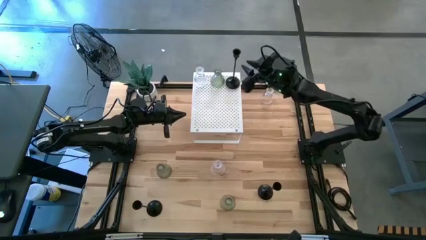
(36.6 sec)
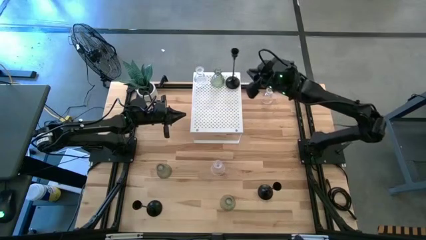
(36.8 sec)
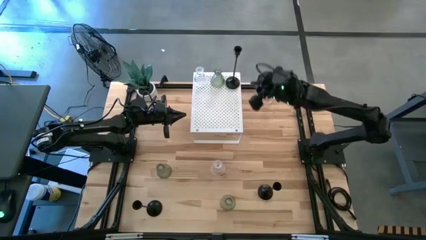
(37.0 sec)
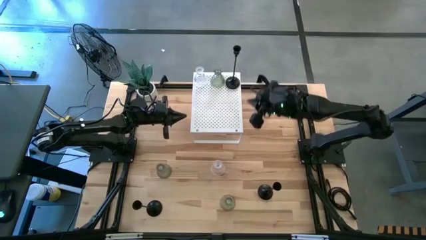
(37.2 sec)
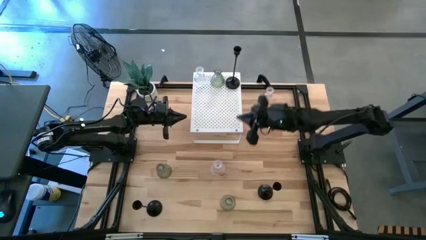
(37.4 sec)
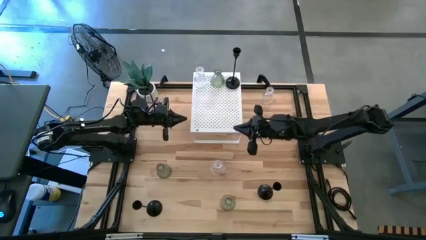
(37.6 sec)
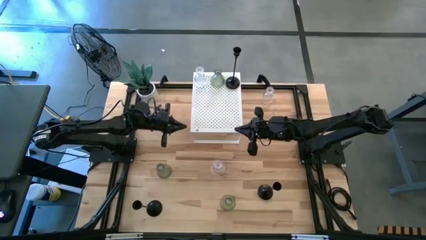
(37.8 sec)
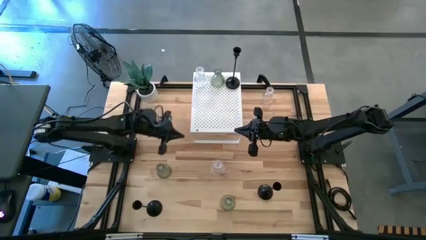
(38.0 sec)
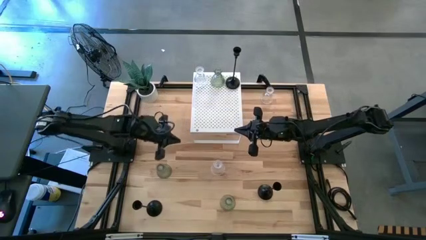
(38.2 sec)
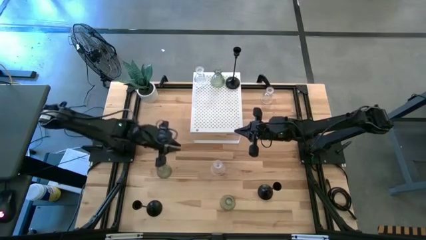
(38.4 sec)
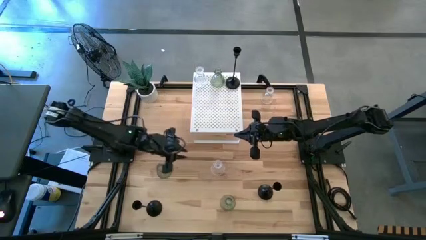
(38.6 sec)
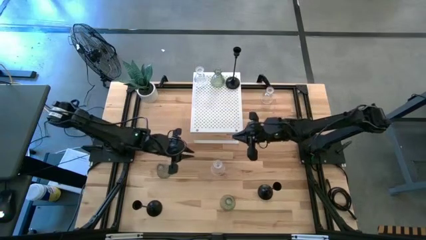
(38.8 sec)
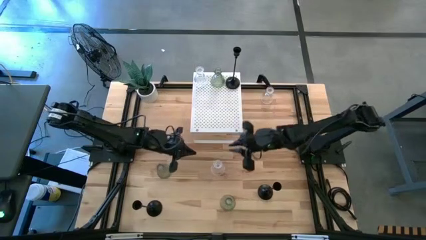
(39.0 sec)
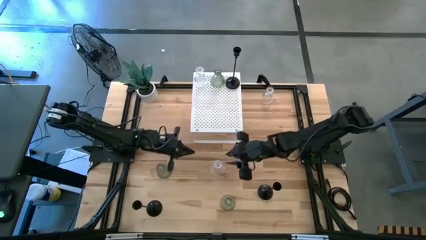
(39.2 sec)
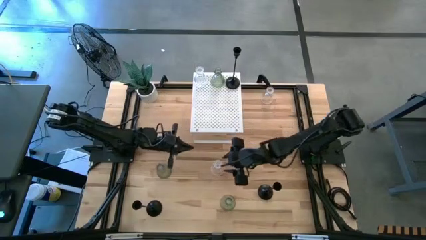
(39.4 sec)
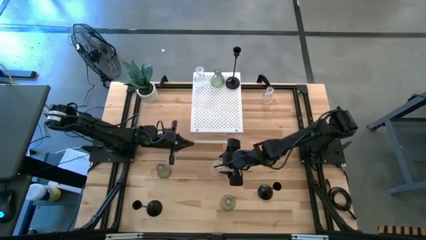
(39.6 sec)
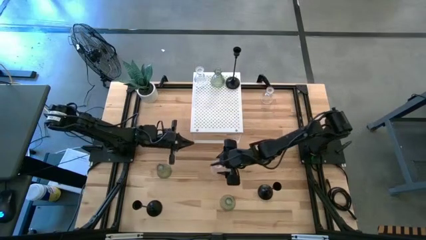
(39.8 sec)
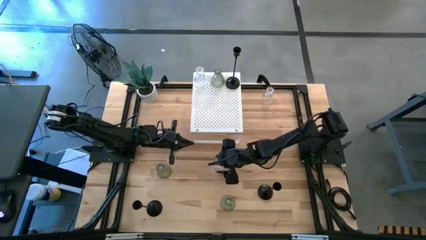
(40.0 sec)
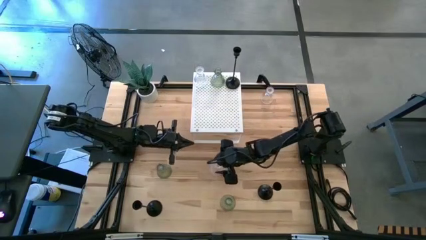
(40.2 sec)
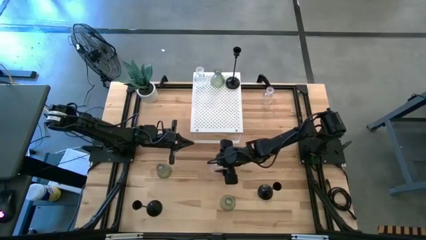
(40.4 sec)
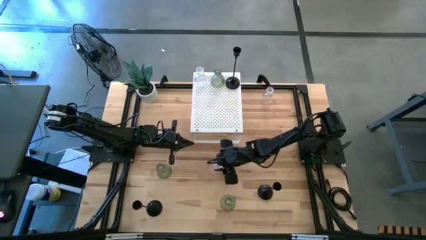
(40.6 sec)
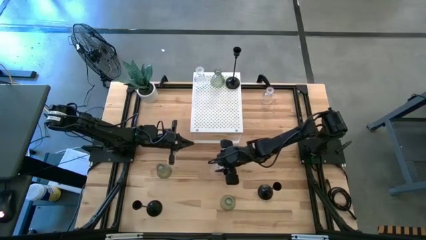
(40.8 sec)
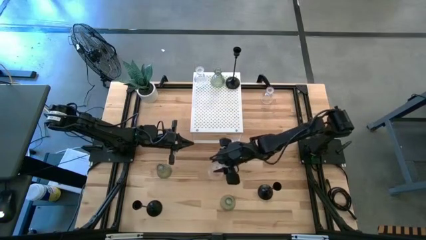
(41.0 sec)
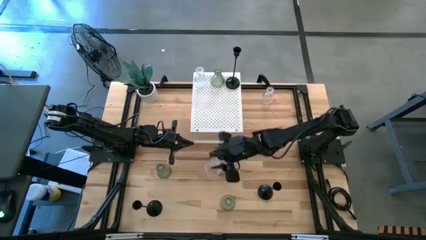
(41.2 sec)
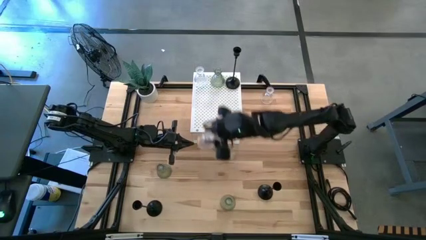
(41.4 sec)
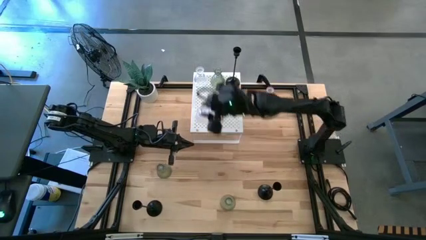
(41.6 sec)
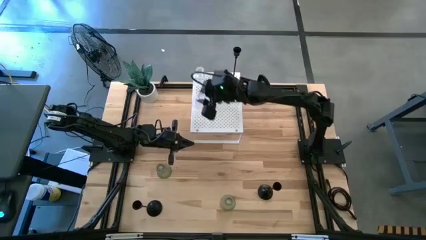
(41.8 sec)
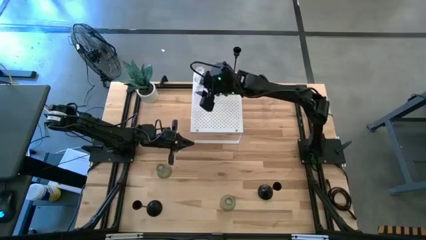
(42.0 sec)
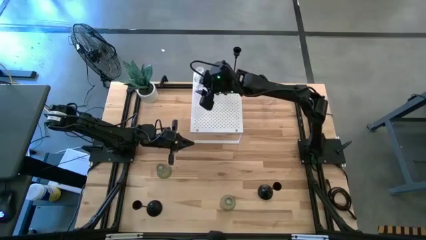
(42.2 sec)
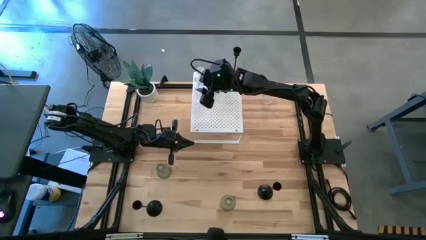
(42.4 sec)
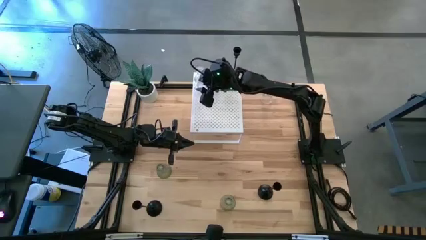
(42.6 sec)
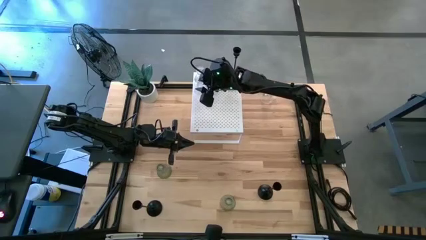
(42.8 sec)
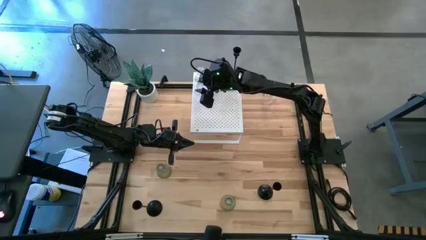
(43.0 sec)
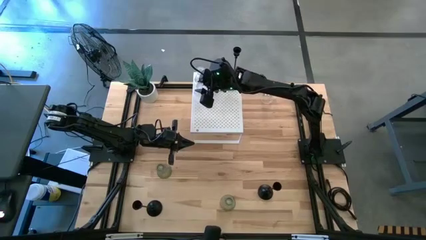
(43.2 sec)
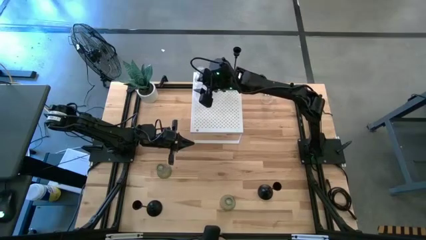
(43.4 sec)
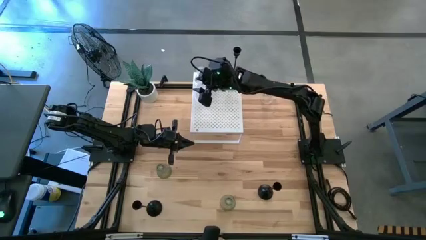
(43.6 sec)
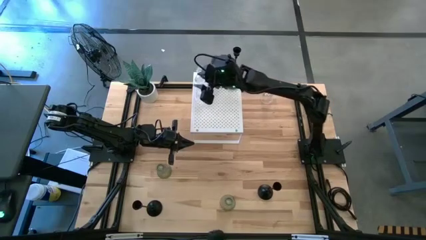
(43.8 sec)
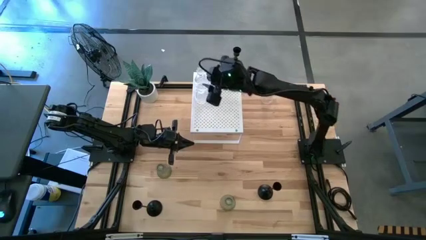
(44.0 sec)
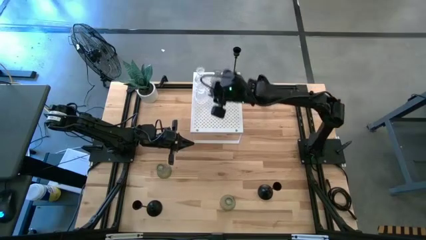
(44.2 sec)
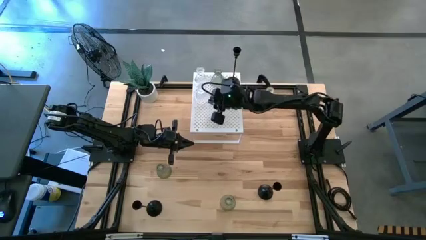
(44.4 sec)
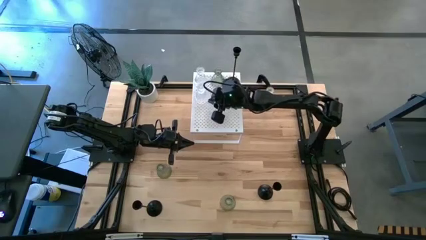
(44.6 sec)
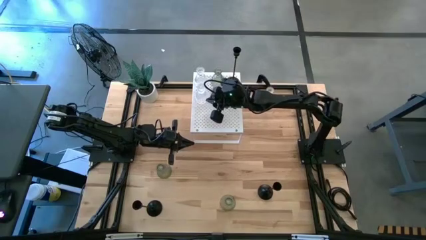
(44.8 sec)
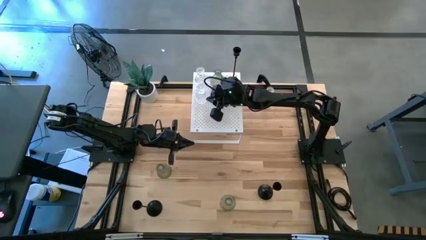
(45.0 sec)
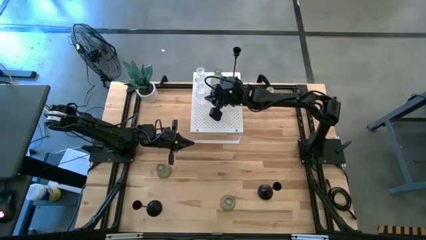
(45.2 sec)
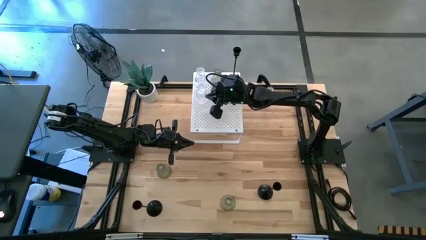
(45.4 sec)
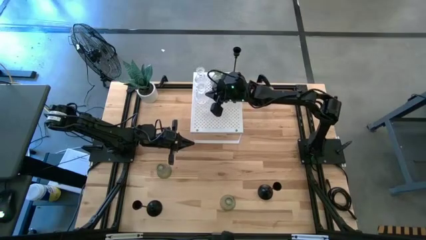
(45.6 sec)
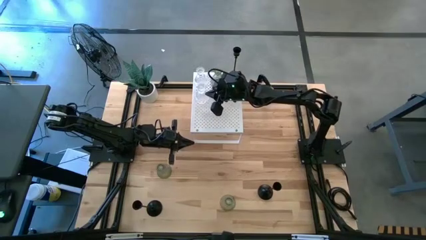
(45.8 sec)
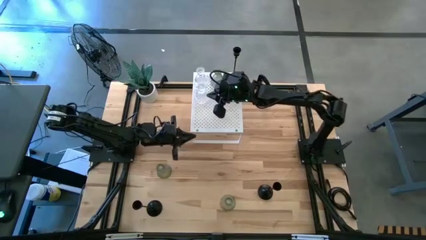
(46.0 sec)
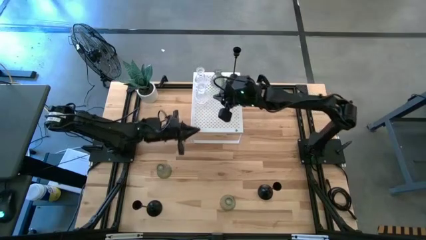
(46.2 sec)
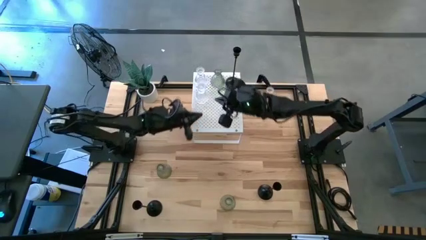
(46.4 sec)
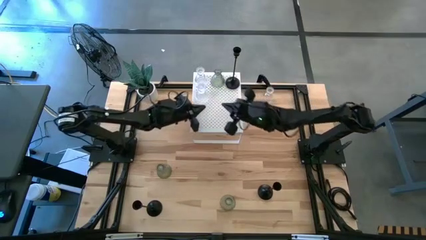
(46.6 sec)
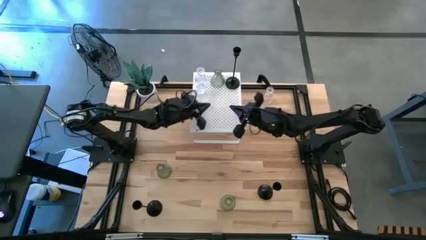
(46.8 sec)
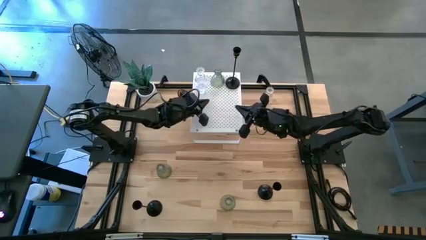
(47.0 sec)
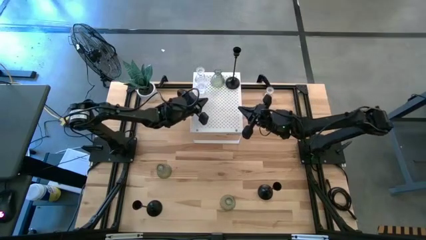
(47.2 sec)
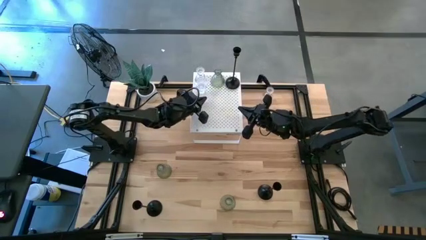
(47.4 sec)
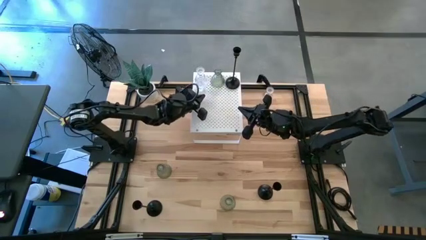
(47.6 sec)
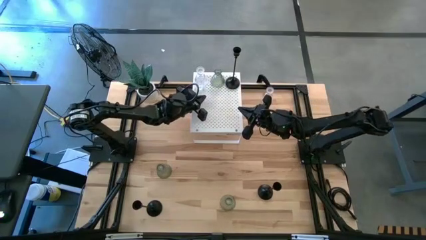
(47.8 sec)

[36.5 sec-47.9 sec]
Task: Pick & Place candle stick holders
Put the left transparent candle holder on the shelf aligned with the transparent candle holder

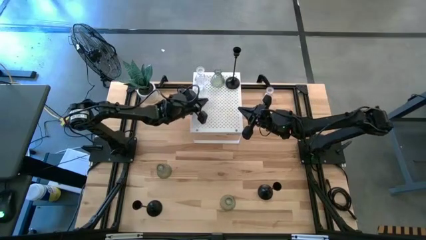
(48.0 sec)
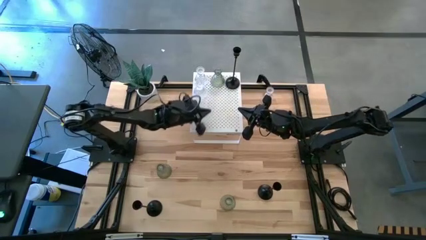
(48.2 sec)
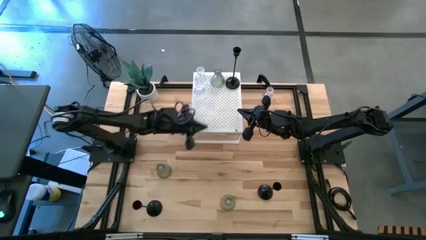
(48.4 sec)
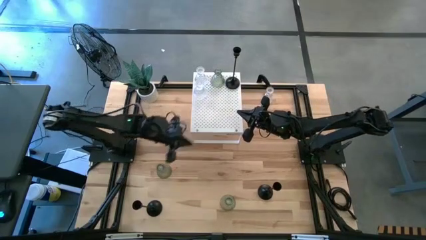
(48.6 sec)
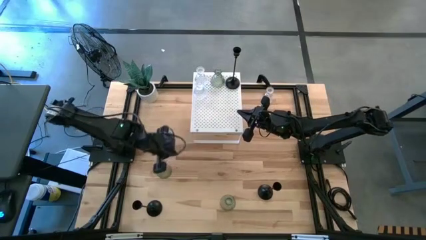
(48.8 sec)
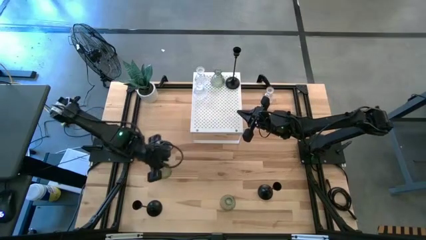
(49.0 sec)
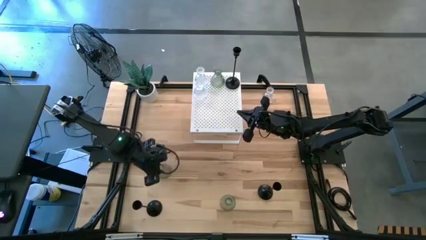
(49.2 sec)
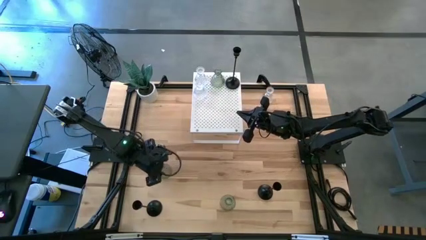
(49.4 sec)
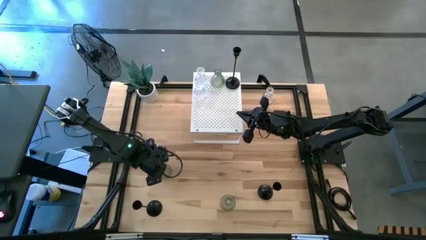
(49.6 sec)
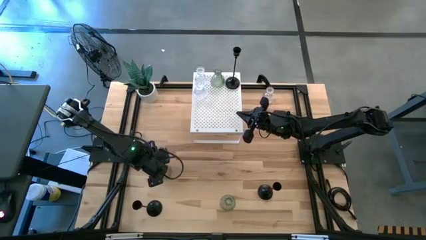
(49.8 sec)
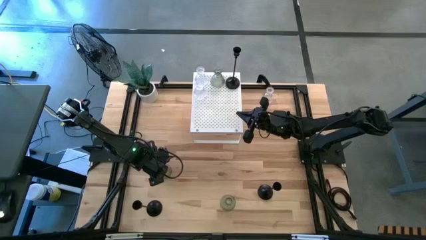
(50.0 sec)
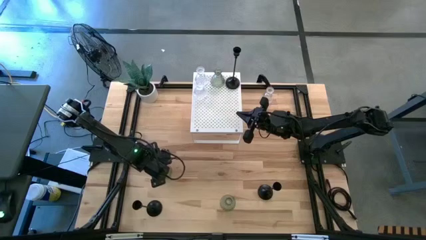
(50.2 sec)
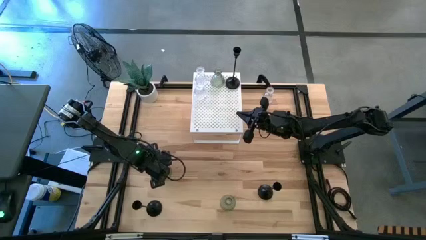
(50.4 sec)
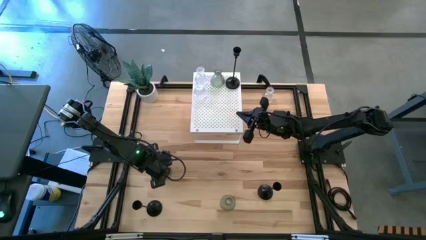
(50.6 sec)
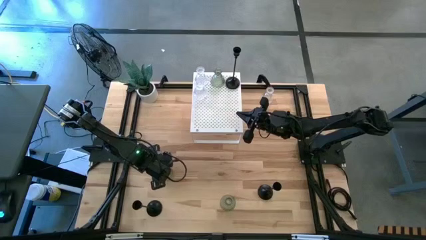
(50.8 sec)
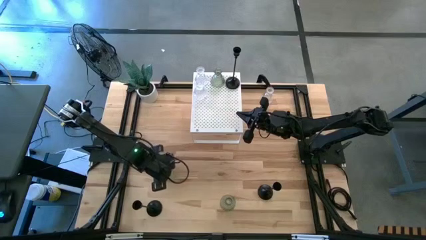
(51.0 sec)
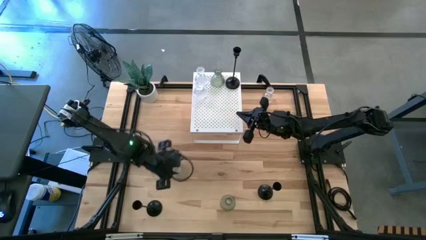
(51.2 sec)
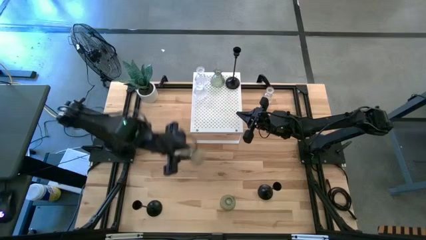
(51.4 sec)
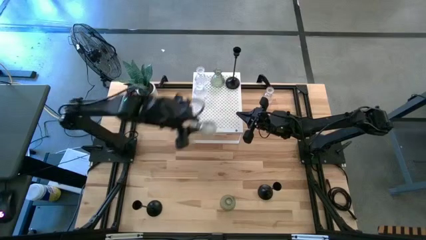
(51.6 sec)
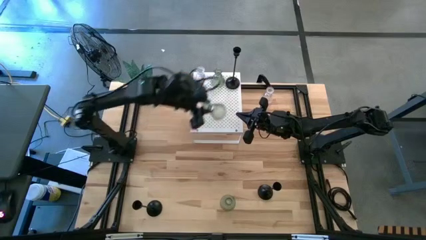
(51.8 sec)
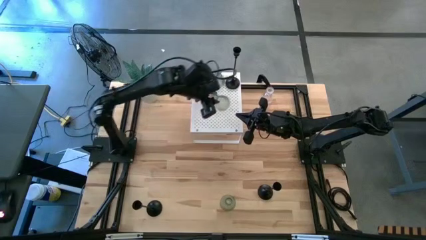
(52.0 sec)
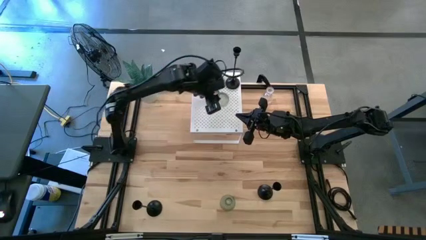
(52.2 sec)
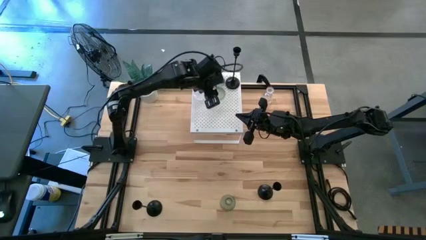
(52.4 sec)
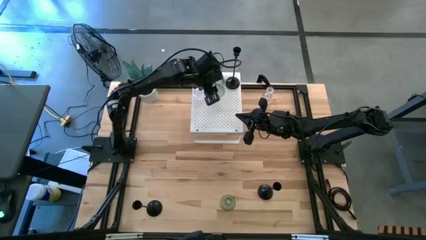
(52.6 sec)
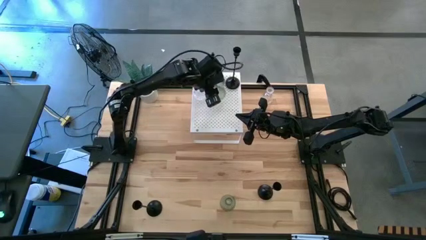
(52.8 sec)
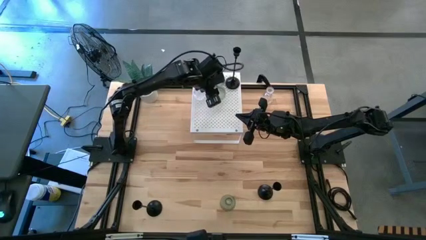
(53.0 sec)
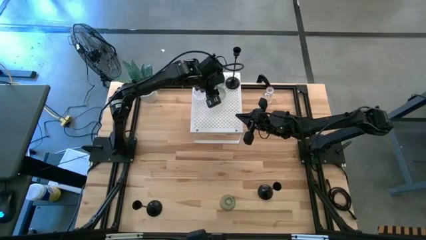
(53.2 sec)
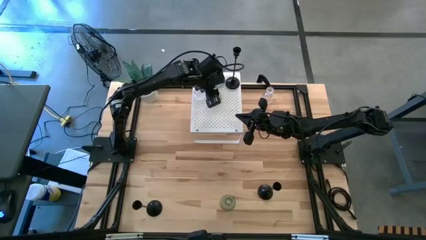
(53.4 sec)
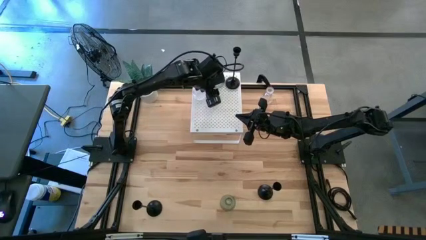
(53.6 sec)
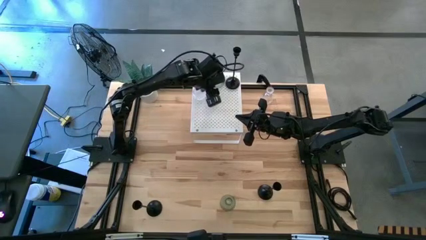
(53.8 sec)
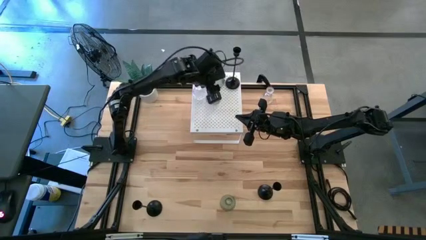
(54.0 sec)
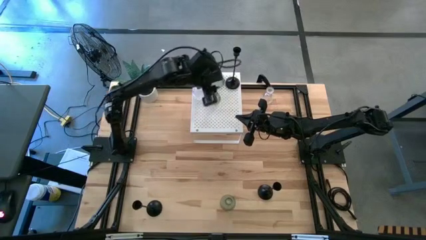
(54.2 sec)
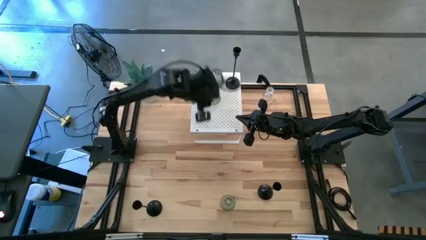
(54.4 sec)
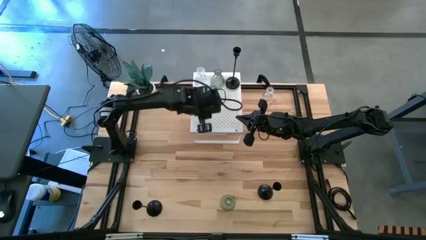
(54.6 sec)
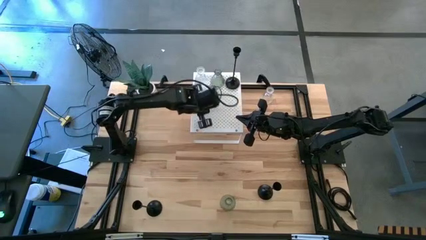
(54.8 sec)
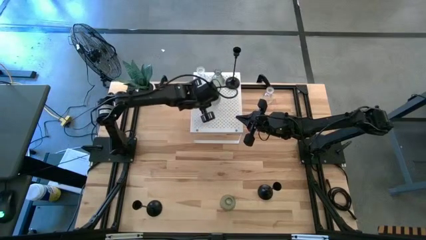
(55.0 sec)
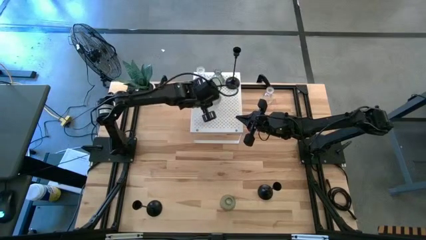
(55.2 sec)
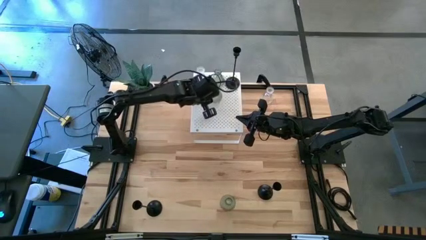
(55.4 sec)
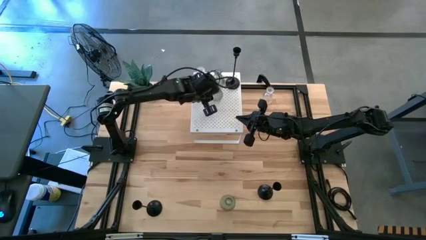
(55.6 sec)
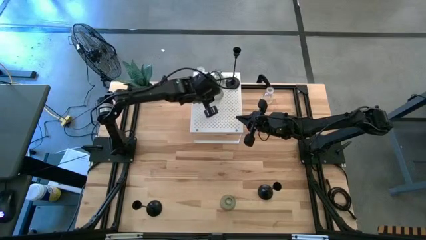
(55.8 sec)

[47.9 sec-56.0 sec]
Put the left green candle holder on the shelf aligned with the green candle holder
